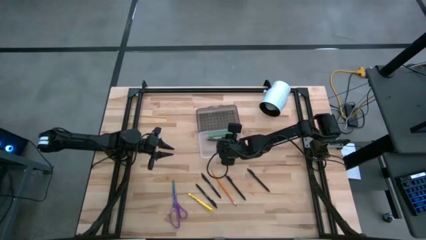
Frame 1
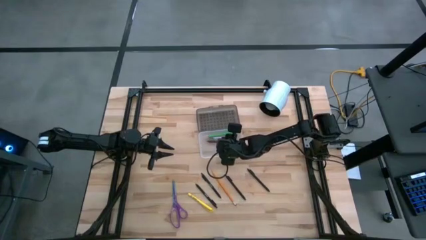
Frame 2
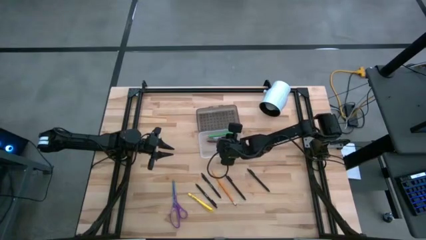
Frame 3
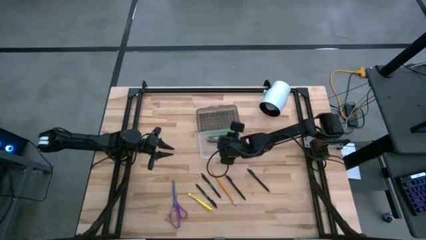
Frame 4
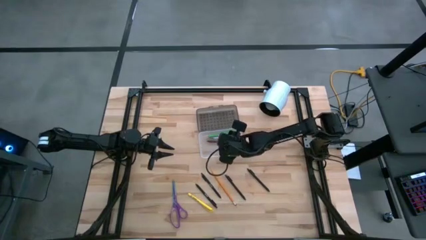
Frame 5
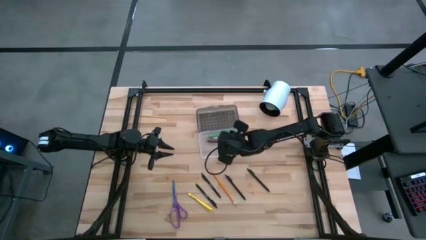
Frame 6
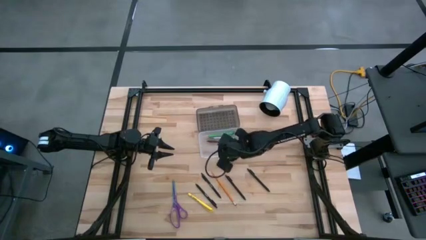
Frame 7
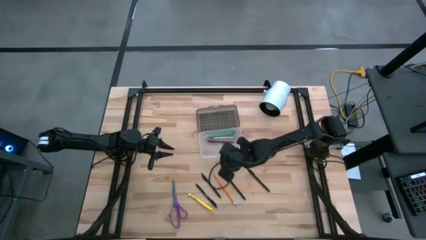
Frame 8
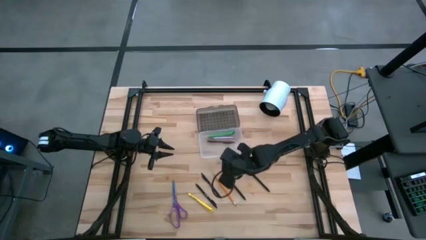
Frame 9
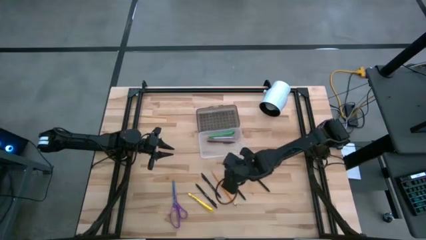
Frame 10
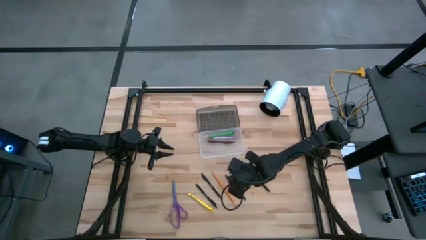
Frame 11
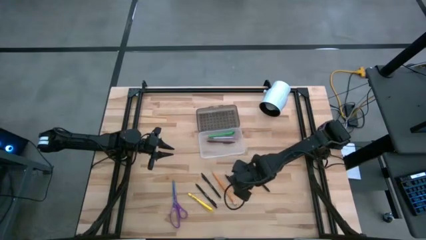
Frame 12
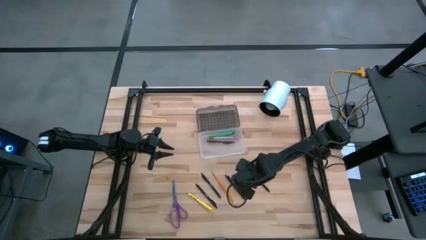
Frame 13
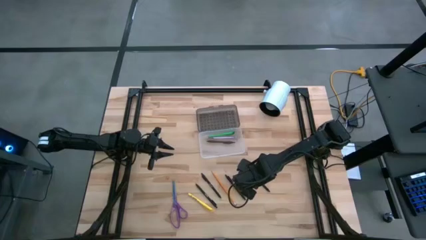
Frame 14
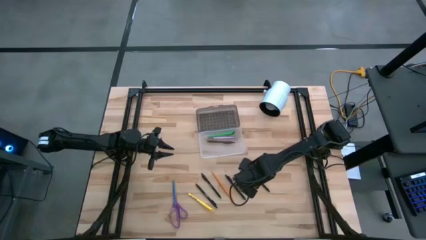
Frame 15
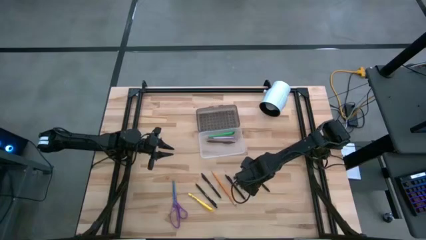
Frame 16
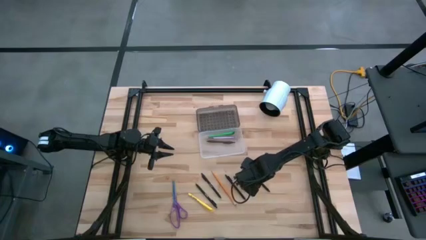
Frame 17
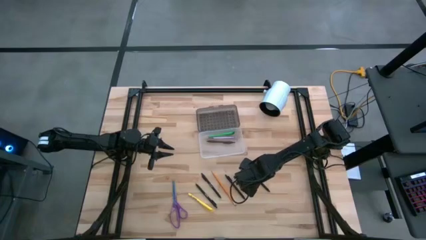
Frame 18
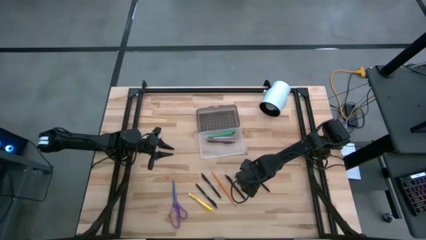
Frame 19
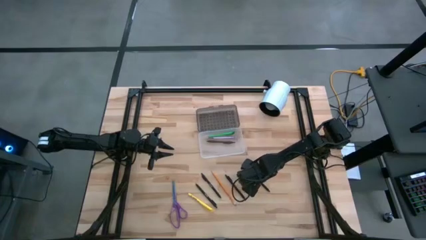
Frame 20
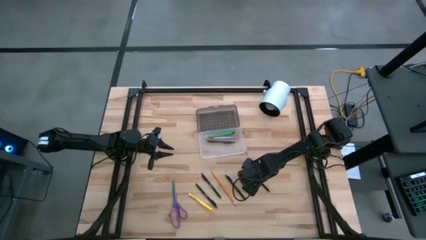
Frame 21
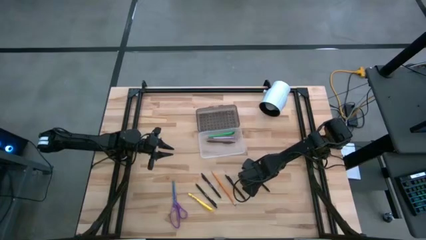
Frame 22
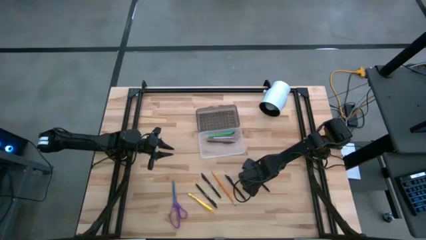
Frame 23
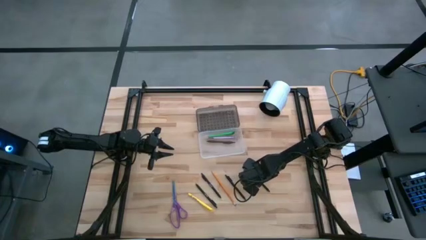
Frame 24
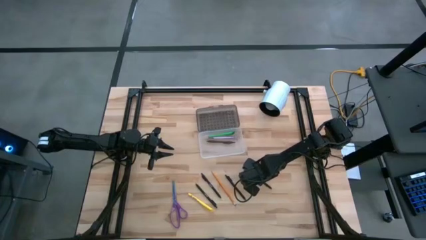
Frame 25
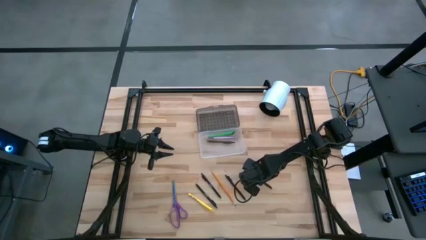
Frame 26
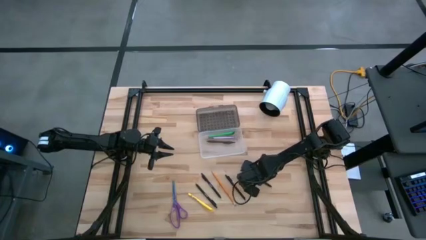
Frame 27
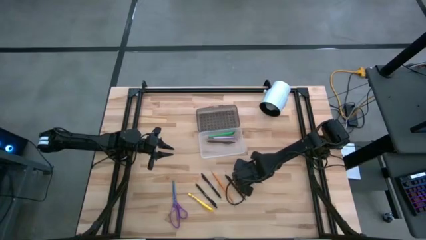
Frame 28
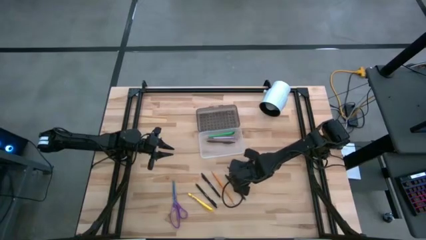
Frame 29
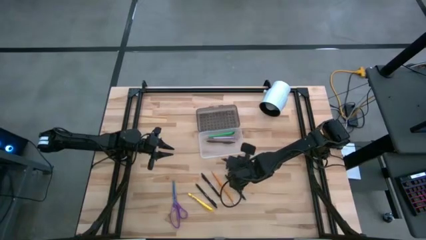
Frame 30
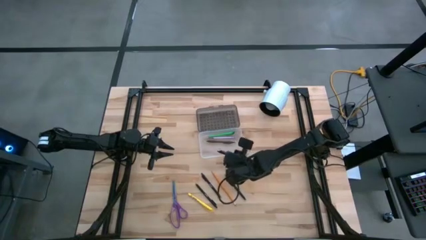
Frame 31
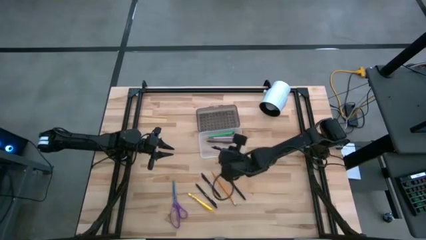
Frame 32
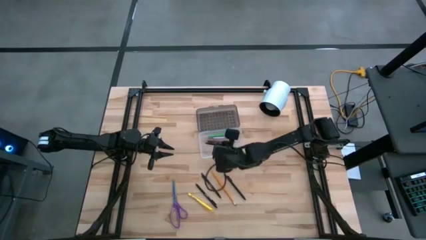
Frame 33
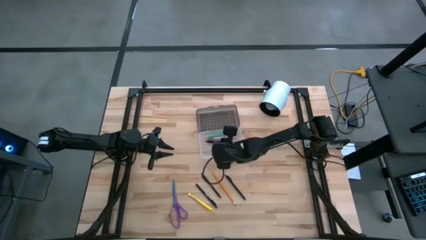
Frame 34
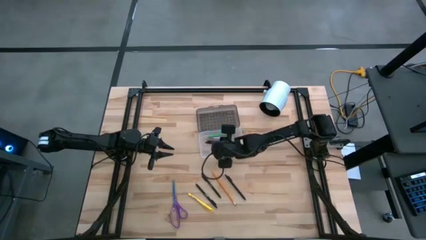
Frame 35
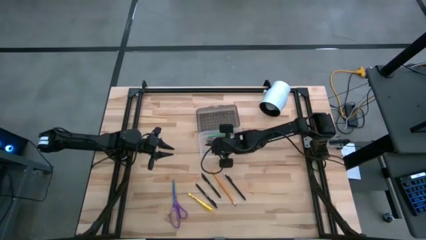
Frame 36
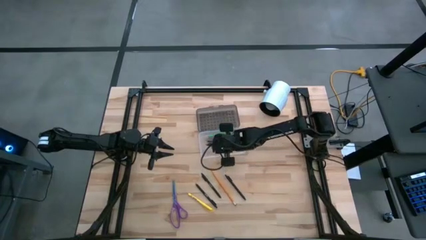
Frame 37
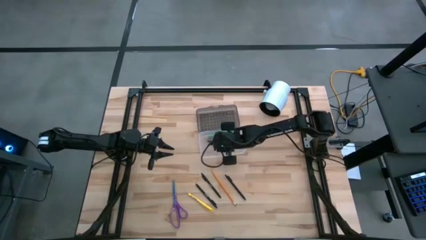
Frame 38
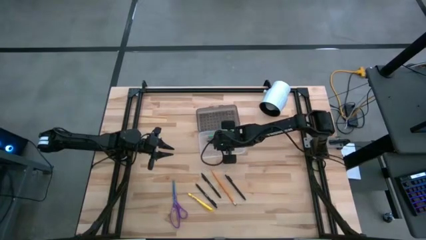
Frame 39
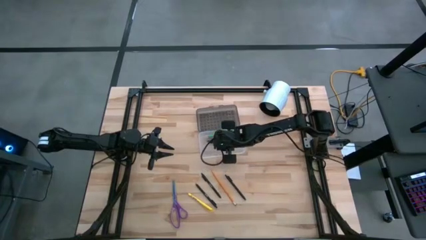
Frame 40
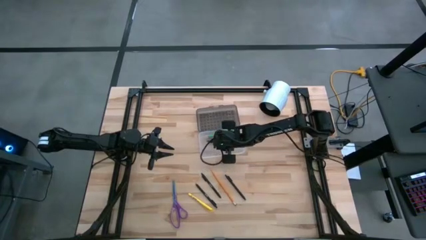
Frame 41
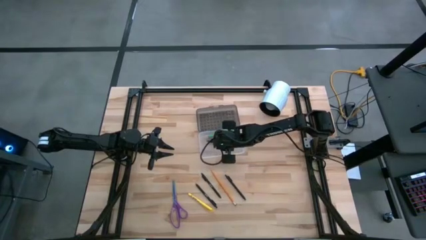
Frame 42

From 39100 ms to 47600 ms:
Task: Pick & place school supplies into a supply box
Put the black pen into the transparent supply box

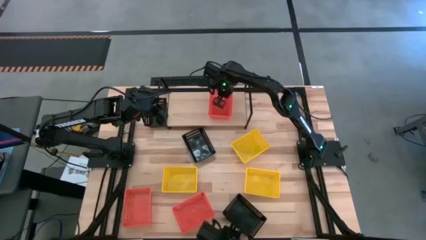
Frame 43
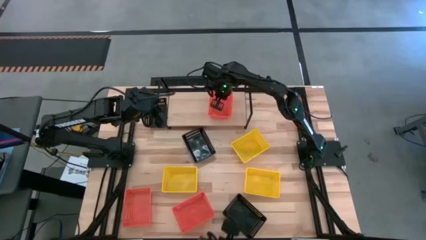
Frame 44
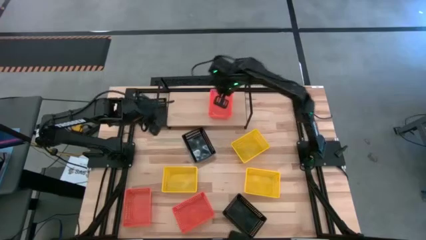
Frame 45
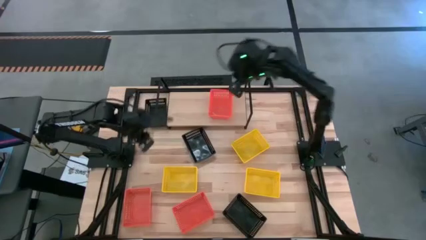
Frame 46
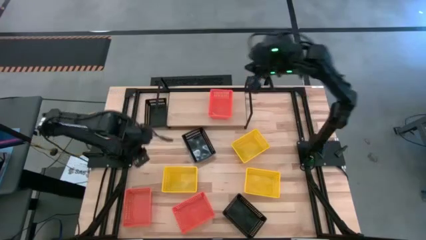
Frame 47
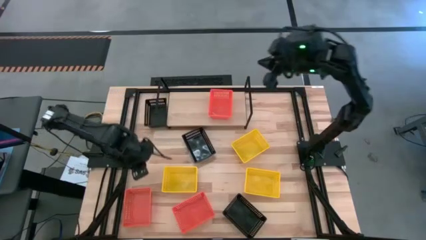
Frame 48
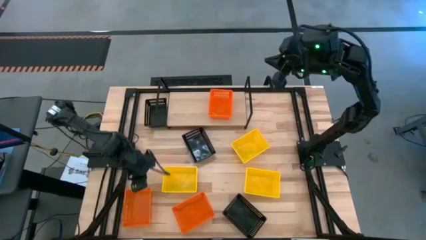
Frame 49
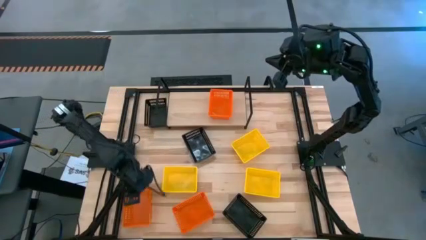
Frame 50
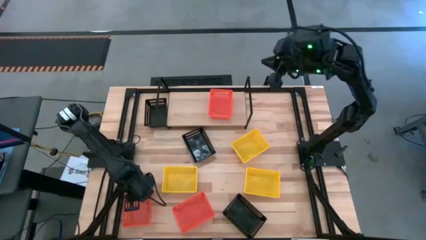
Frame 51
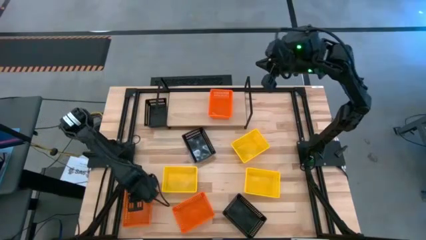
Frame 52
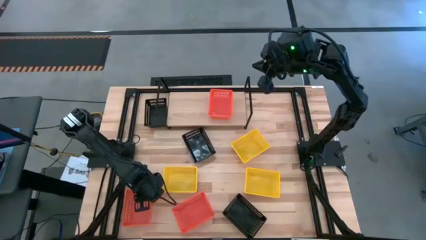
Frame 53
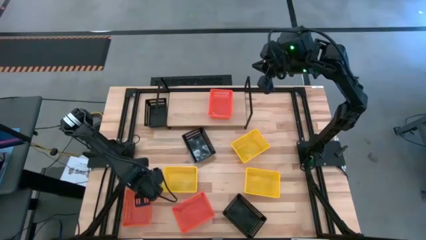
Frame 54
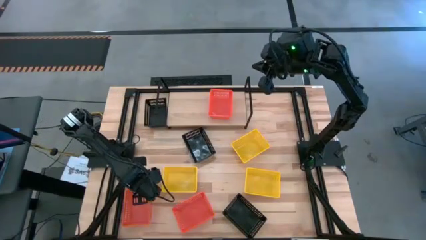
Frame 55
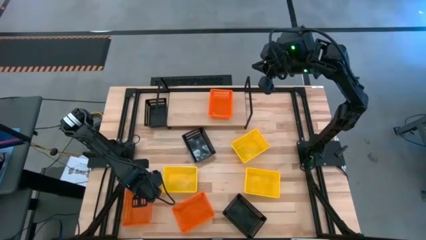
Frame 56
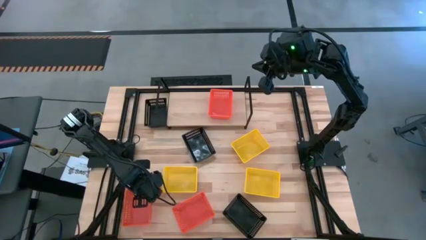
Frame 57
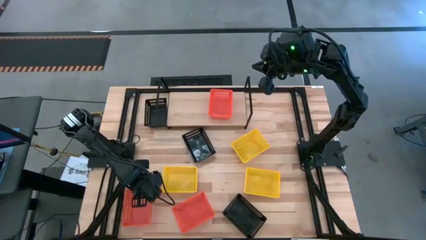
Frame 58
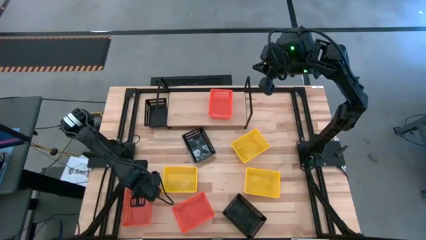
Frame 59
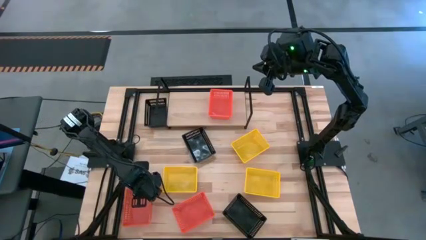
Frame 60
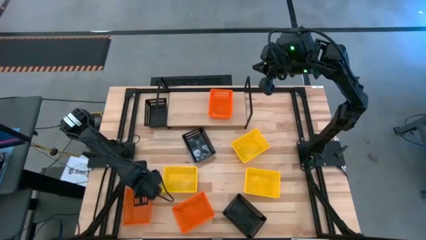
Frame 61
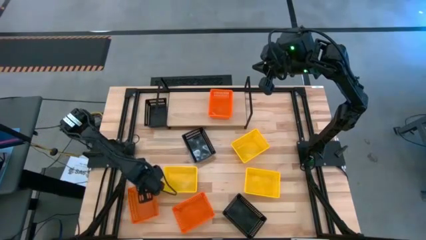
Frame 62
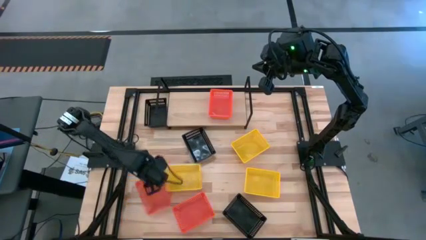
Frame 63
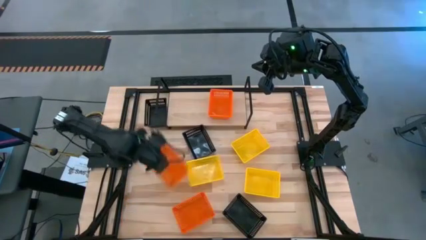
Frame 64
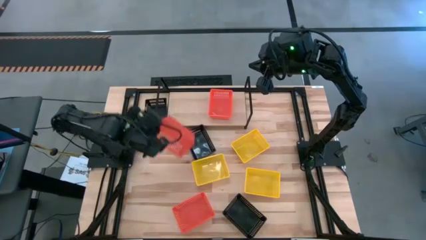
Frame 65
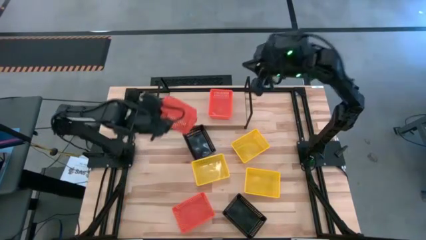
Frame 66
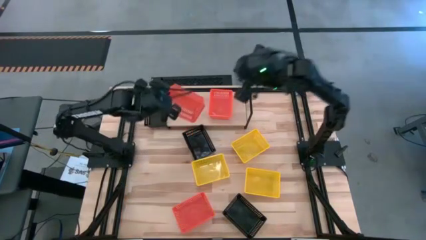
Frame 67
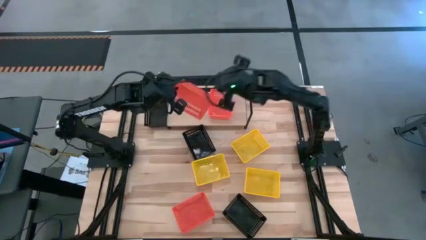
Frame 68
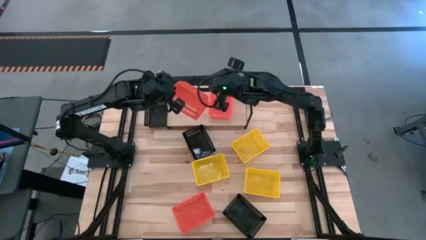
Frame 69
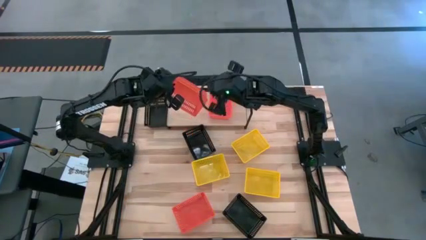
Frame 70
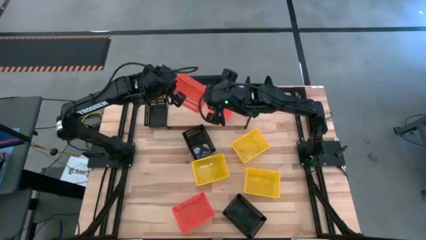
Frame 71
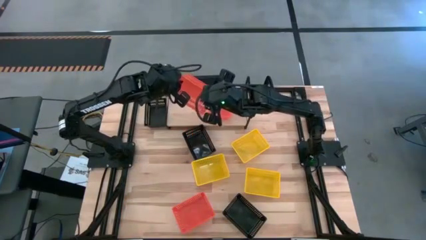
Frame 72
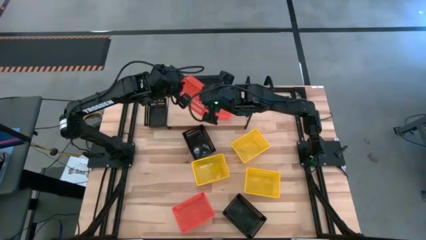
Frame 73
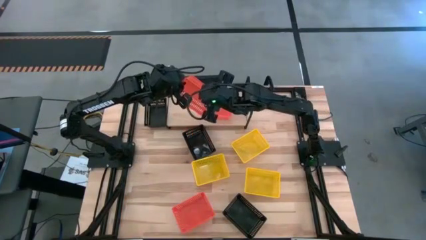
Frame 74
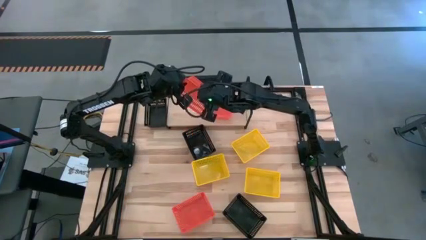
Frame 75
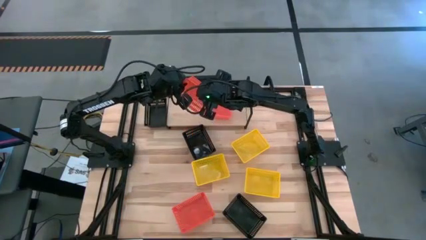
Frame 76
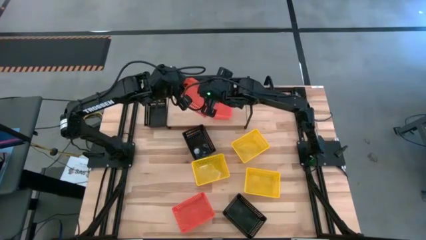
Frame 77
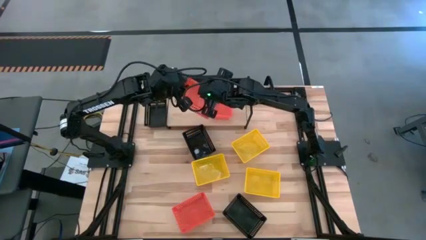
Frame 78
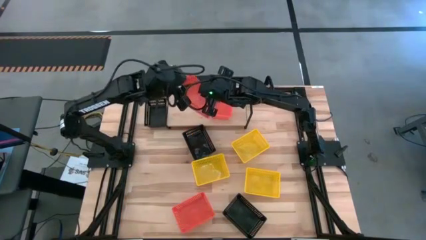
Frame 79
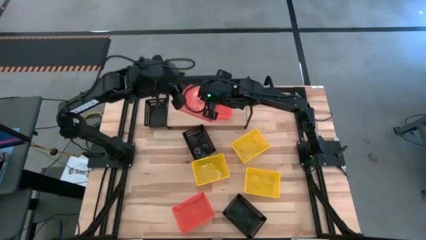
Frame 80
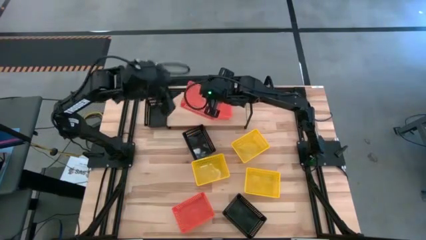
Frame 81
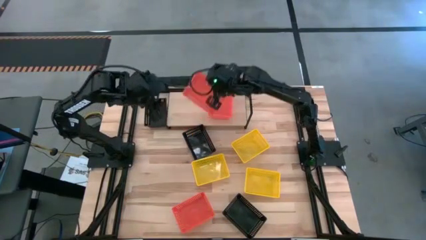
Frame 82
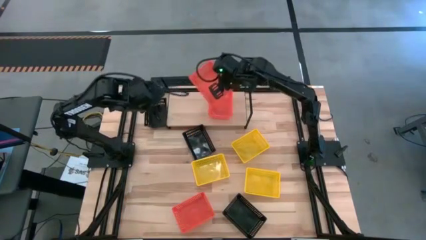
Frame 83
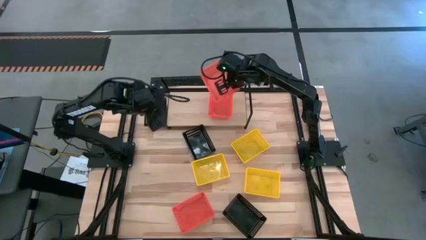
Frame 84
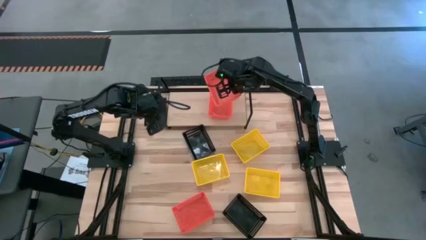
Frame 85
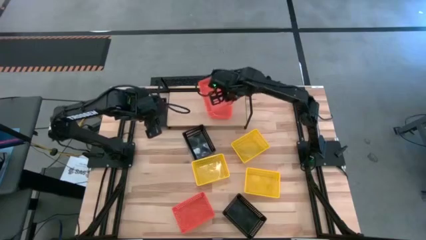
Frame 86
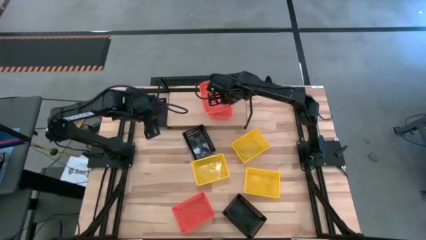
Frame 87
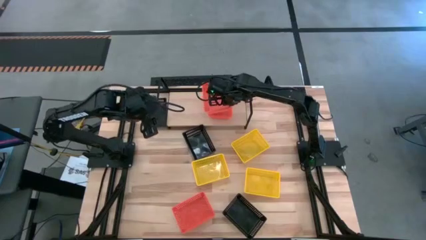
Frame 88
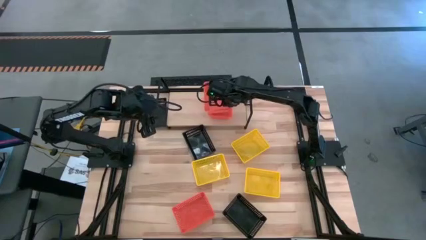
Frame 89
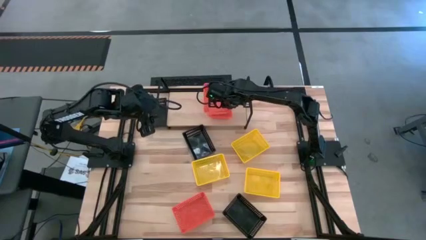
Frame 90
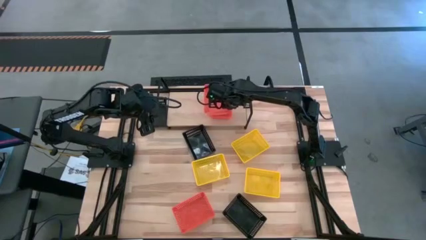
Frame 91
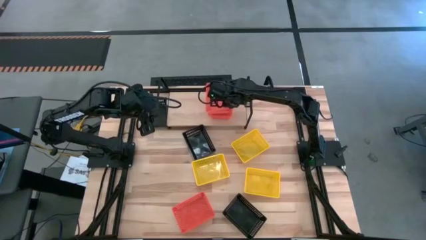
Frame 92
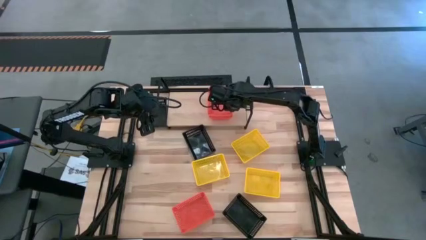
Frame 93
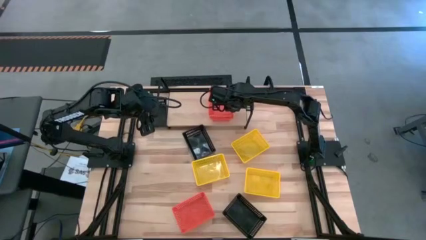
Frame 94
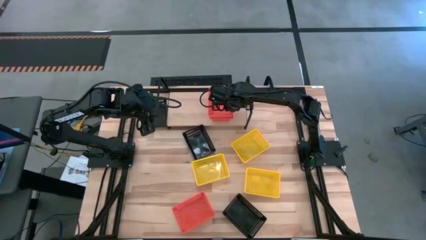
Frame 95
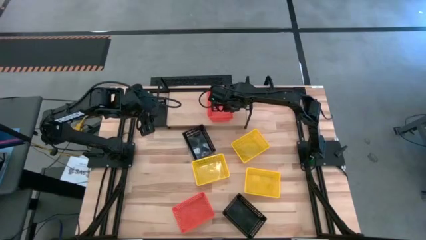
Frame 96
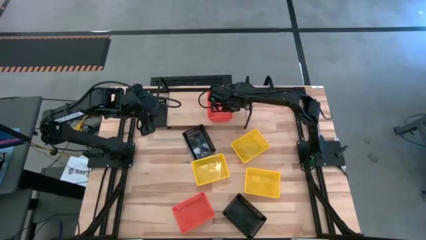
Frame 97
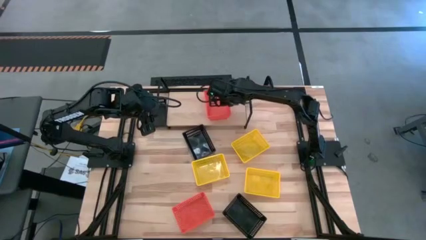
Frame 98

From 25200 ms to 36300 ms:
Task: Stack baskets on shelf by color
Stack the left orange bin on top of the orange bin on the shelf
